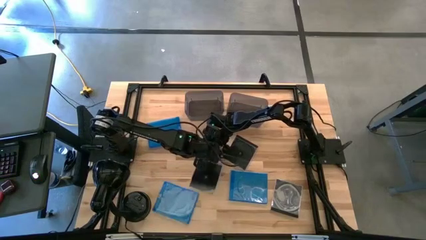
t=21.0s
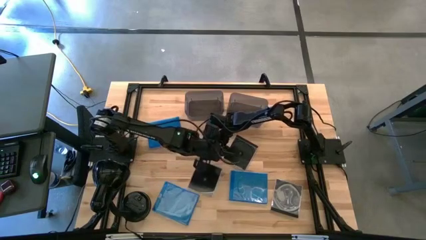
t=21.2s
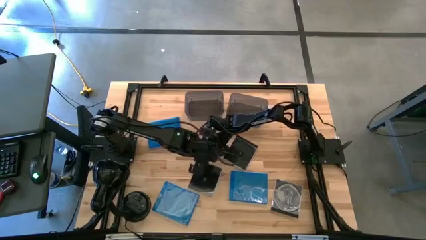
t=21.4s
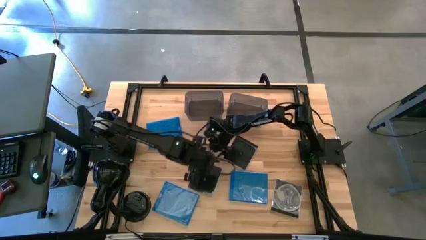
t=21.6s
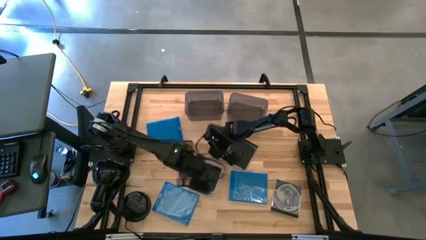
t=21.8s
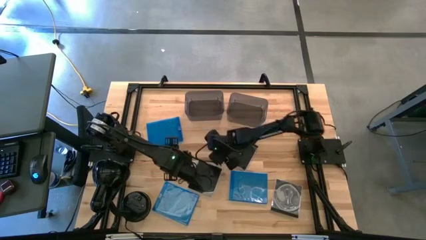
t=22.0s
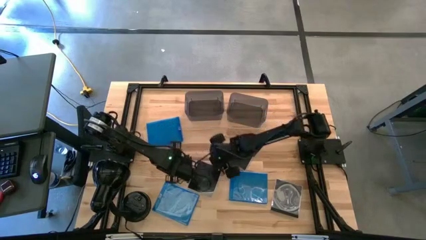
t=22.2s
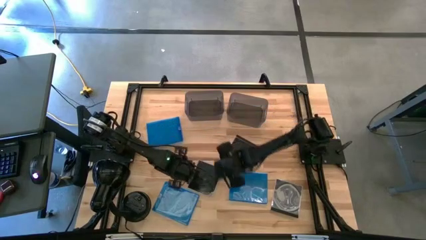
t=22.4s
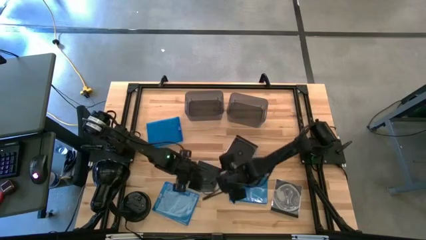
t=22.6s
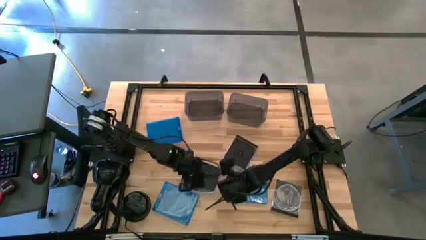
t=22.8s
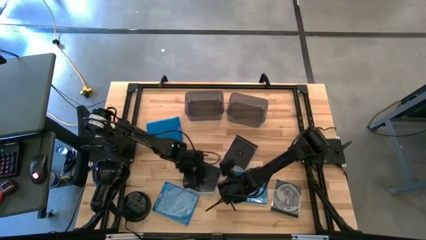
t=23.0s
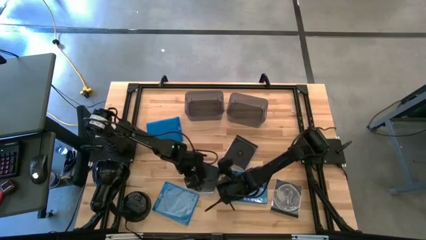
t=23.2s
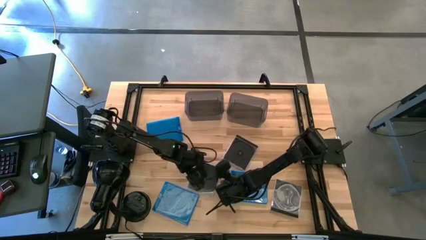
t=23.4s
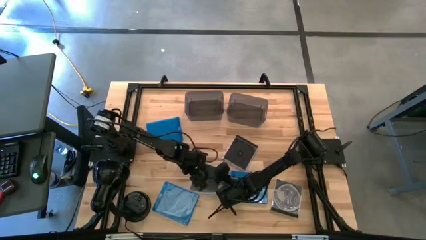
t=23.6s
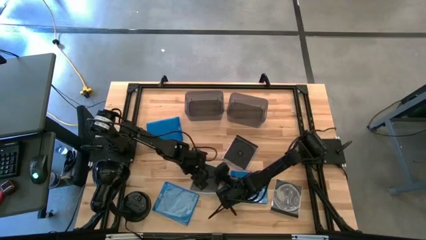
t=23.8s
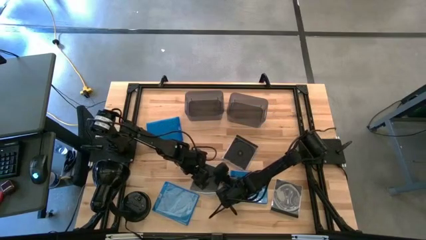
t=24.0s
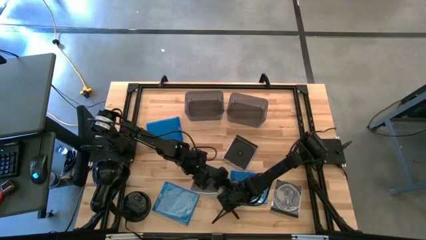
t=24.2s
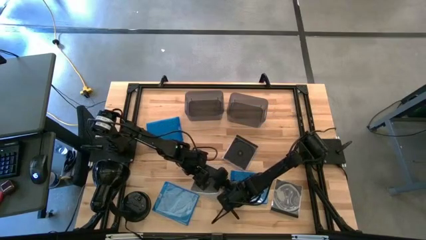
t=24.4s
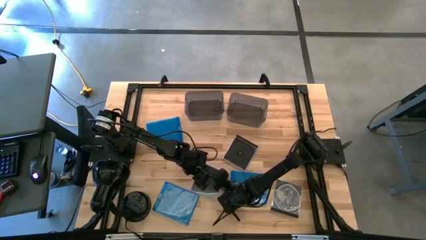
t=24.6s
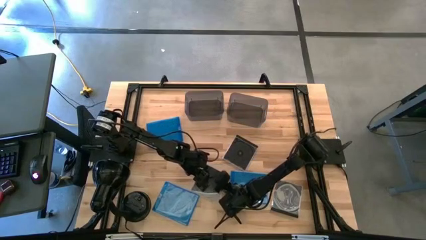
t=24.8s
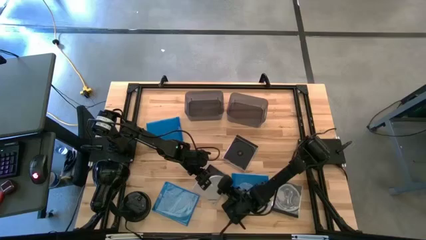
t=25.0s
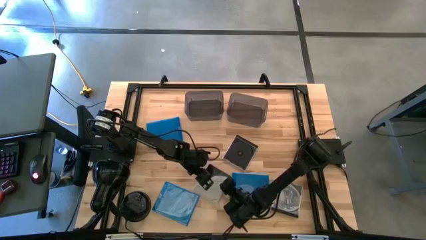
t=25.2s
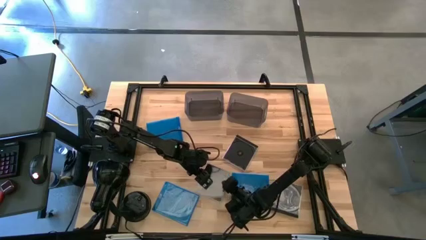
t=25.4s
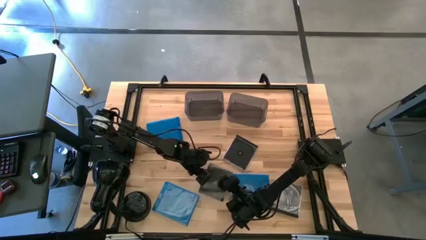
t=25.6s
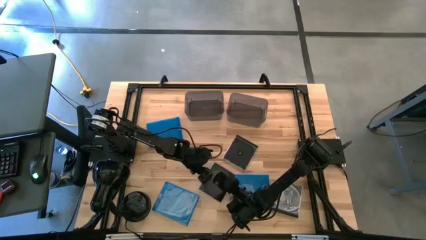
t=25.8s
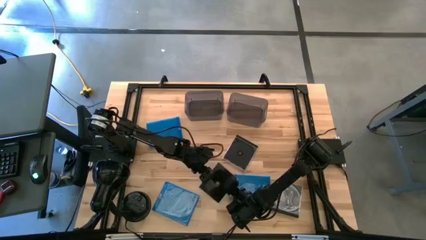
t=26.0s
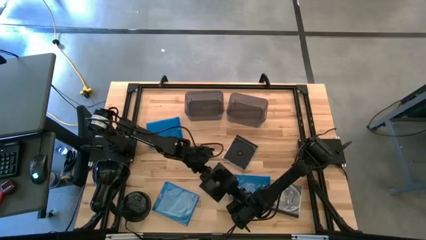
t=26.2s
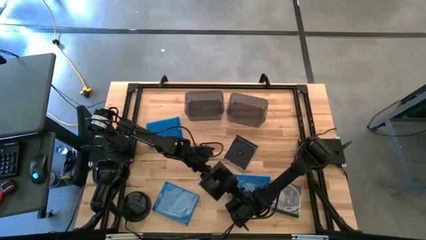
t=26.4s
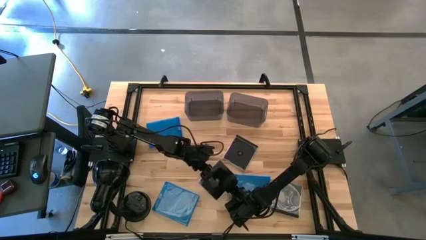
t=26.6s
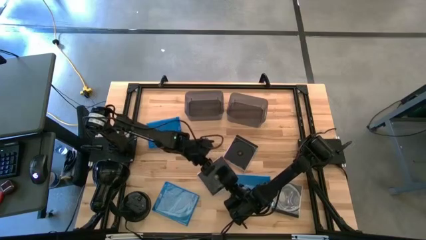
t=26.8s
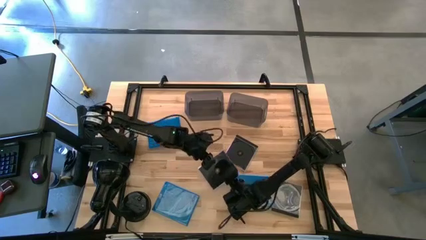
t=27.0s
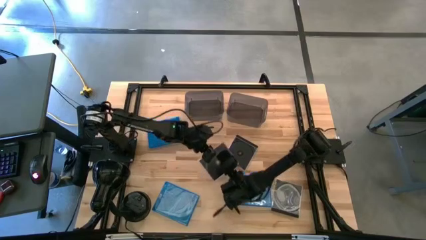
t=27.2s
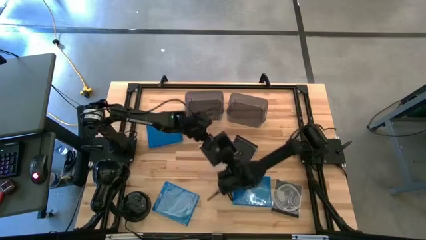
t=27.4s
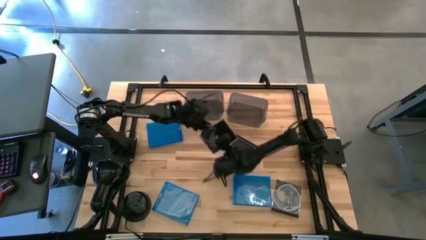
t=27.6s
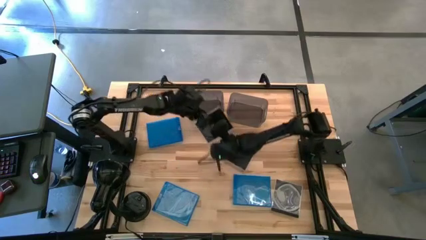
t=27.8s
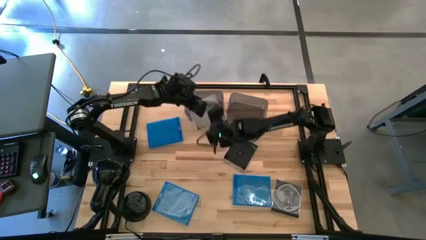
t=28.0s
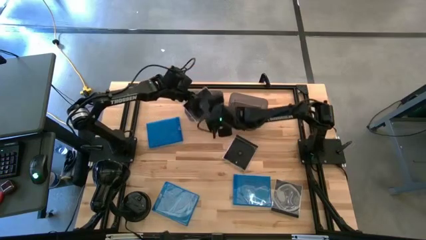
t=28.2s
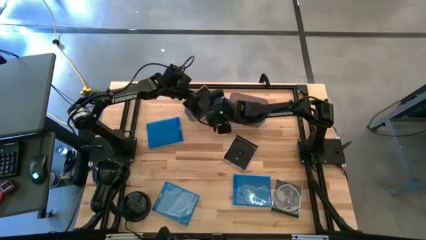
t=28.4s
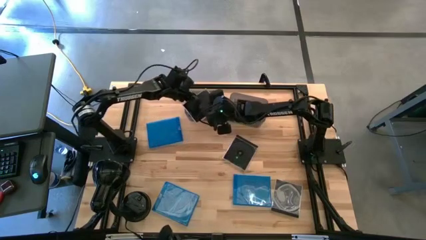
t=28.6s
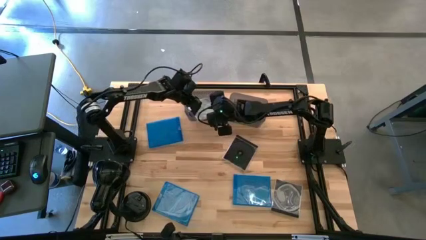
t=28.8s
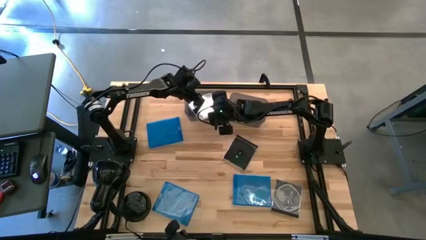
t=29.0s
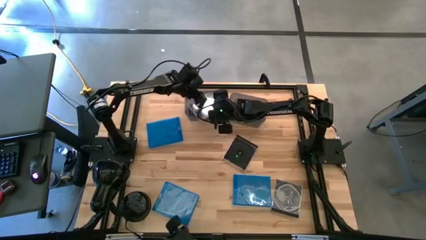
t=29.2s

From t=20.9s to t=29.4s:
Task: Pick & place jewel cases by type
Put the top left black CD case into the left black bin

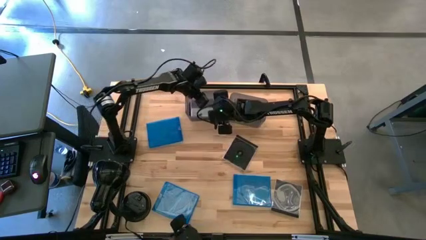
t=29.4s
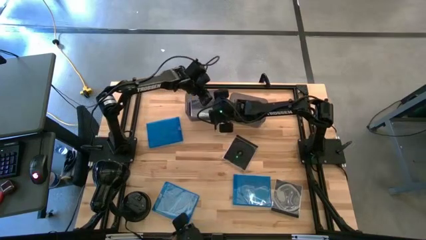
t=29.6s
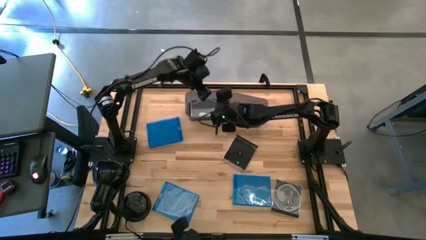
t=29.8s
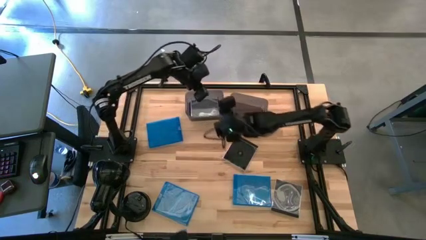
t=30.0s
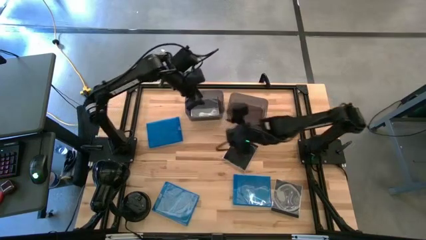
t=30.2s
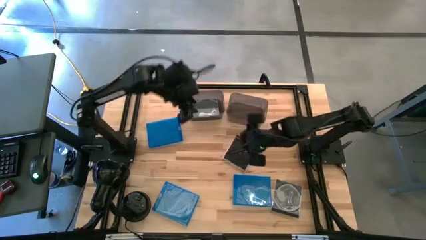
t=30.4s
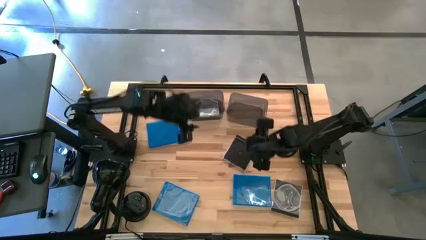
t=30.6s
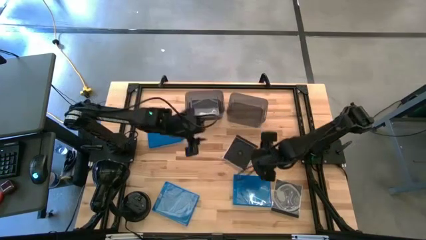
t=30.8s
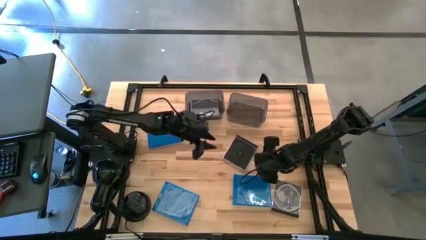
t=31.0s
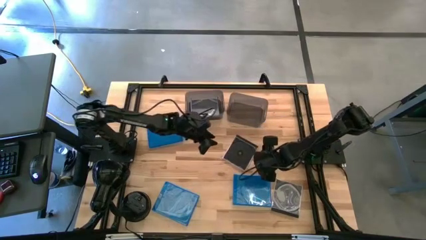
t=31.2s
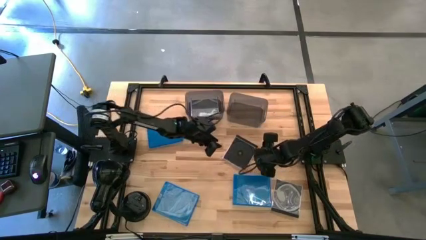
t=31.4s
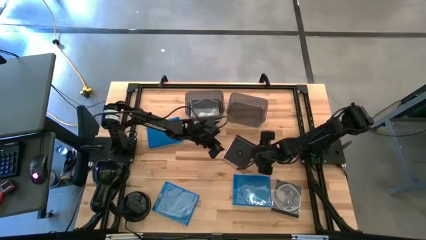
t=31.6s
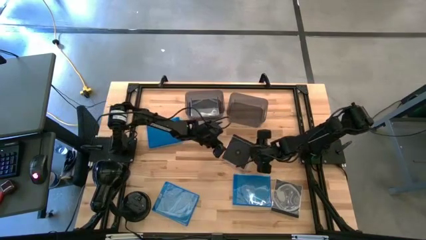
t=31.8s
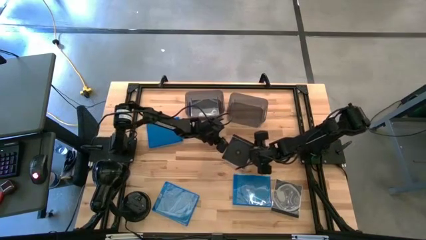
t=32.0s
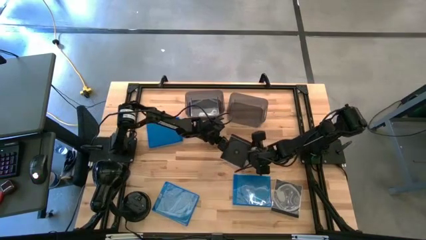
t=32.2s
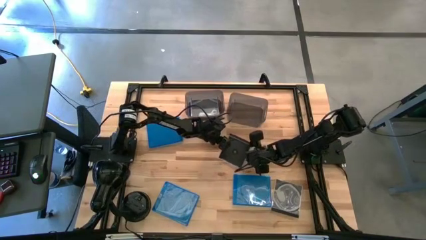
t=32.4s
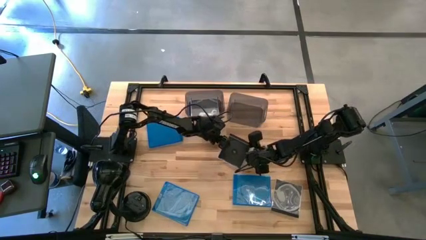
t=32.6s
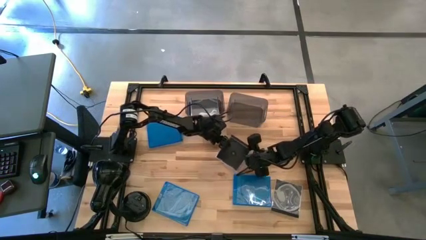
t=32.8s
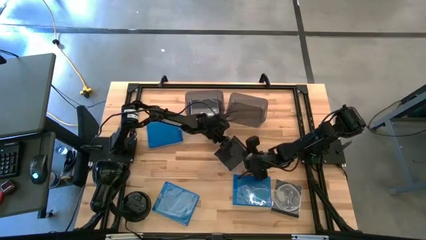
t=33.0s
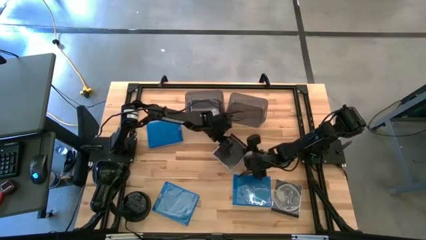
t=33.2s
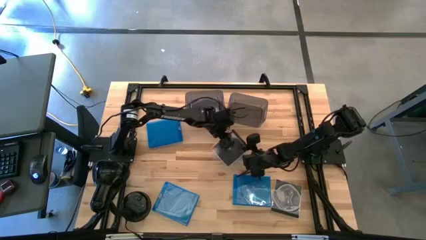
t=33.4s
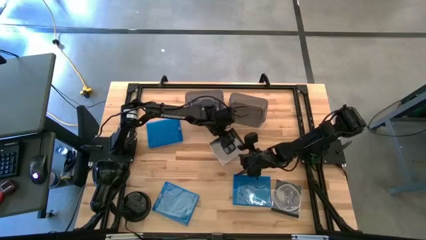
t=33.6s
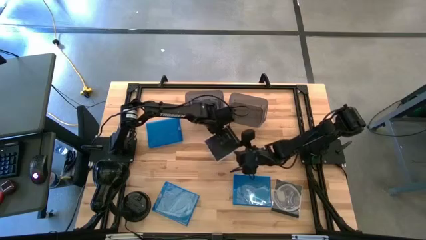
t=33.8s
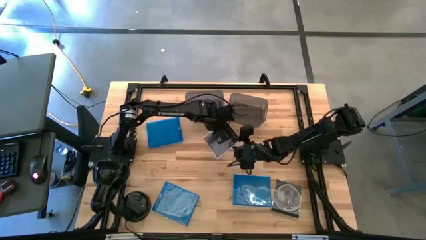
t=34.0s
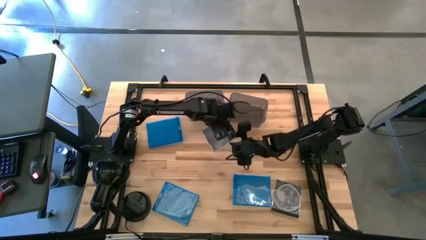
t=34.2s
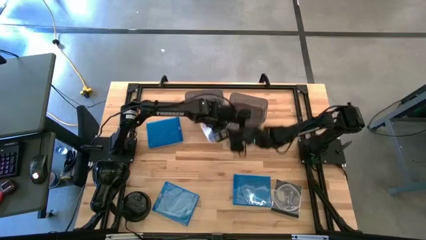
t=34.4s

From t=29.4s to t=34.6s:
Put the top black CD case into the left black bin
